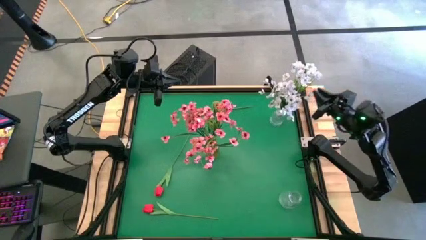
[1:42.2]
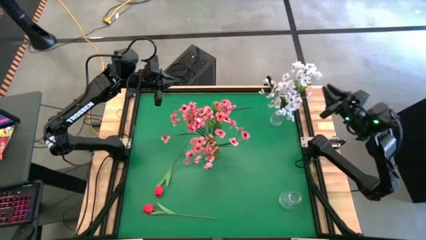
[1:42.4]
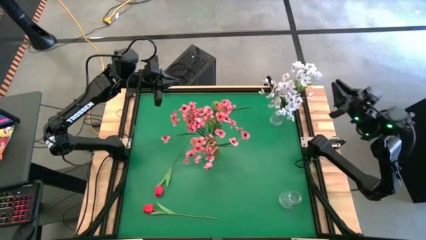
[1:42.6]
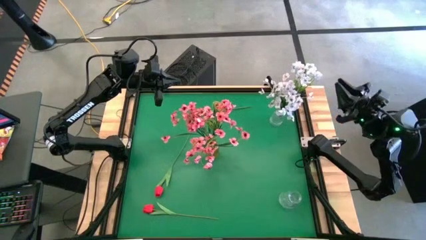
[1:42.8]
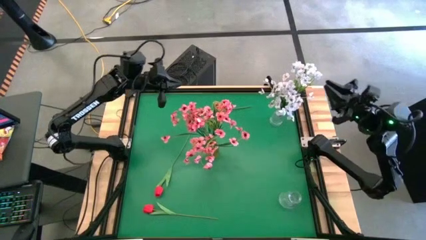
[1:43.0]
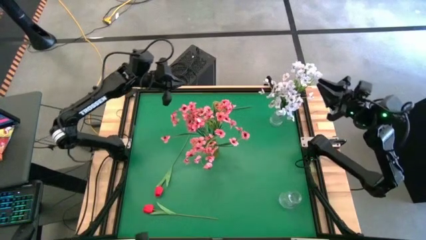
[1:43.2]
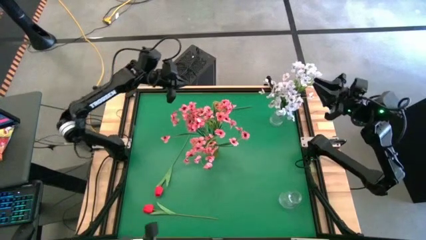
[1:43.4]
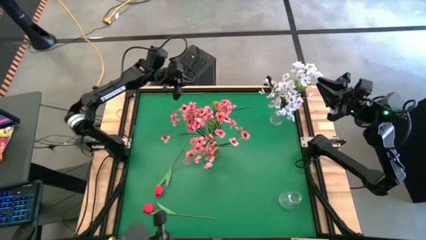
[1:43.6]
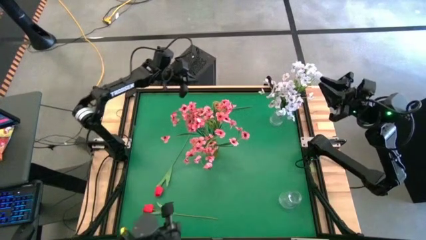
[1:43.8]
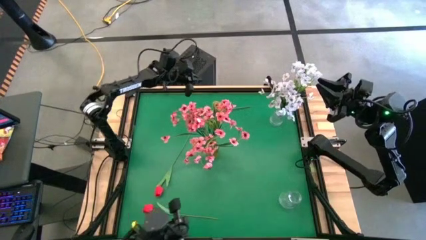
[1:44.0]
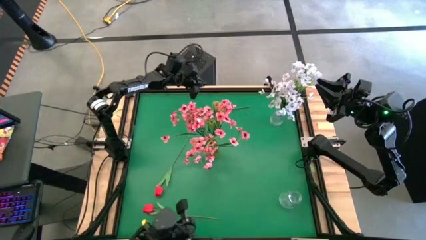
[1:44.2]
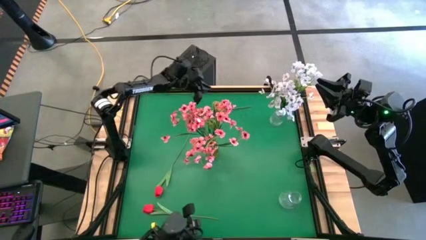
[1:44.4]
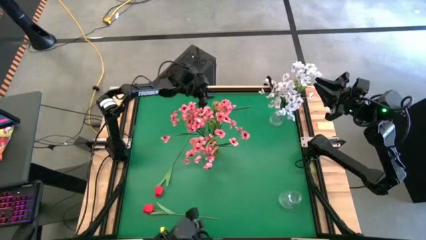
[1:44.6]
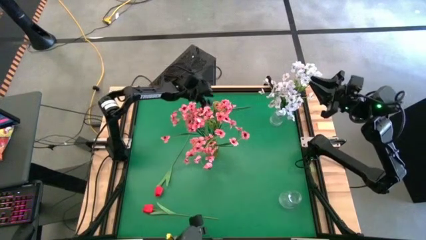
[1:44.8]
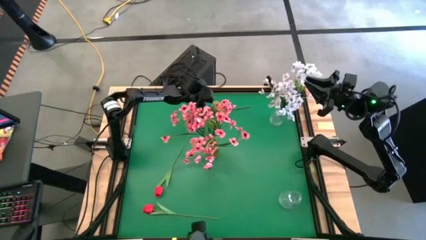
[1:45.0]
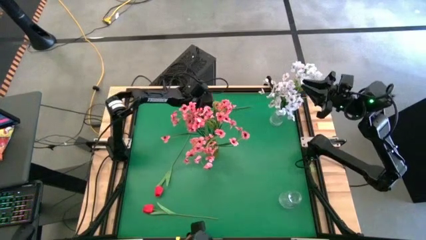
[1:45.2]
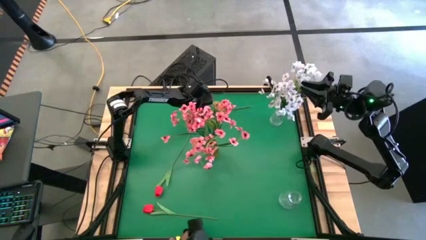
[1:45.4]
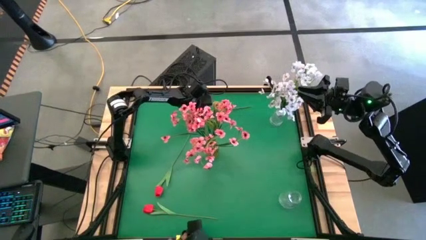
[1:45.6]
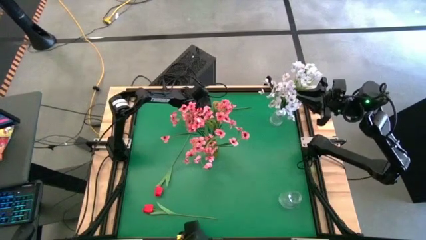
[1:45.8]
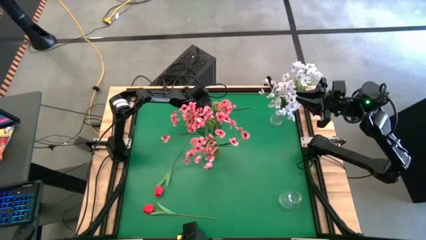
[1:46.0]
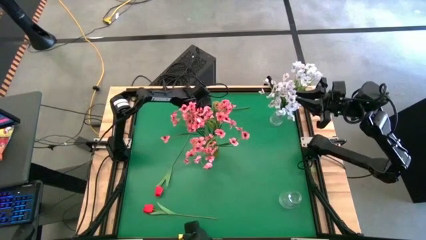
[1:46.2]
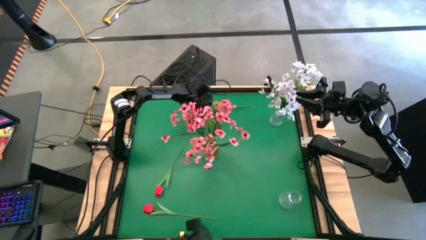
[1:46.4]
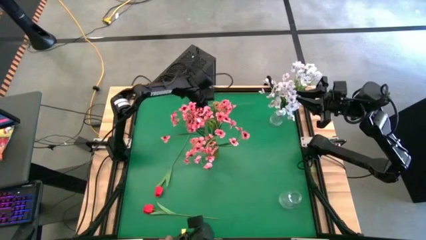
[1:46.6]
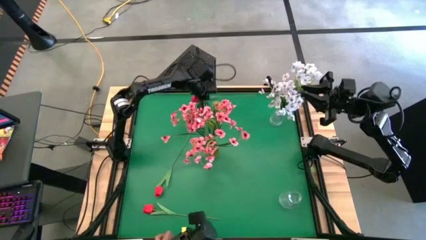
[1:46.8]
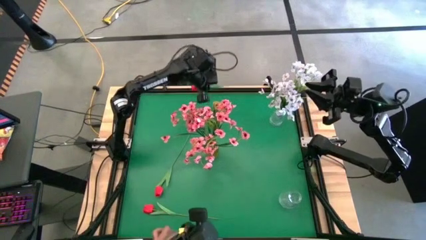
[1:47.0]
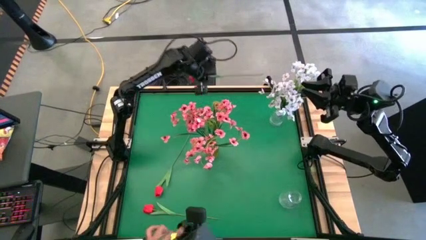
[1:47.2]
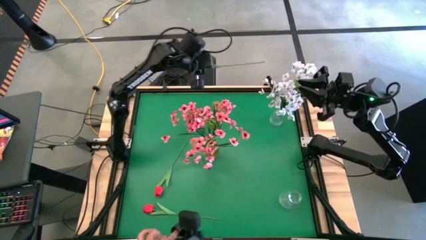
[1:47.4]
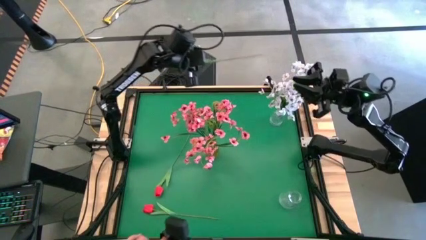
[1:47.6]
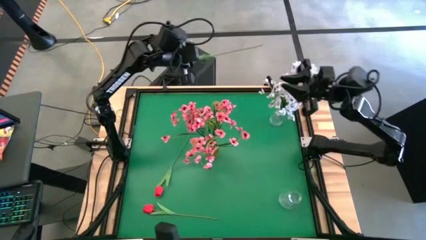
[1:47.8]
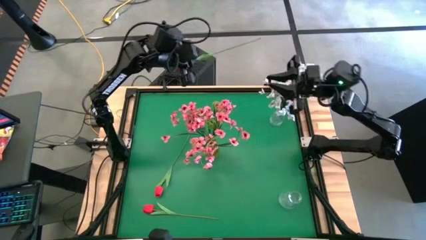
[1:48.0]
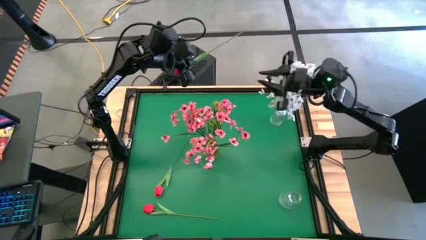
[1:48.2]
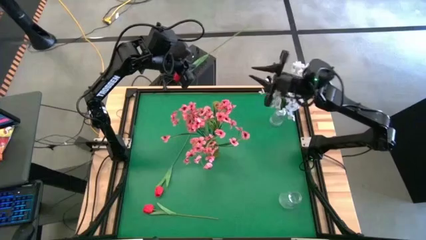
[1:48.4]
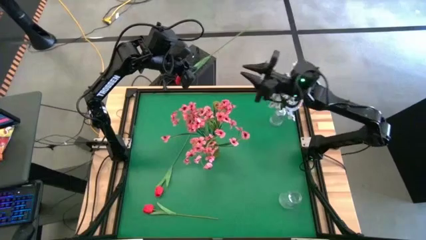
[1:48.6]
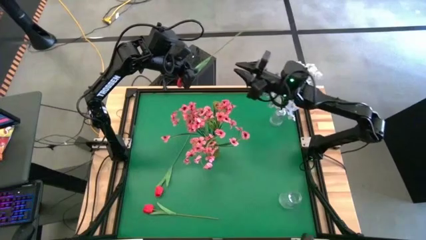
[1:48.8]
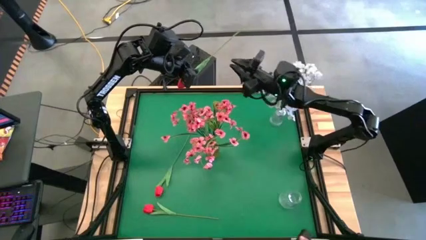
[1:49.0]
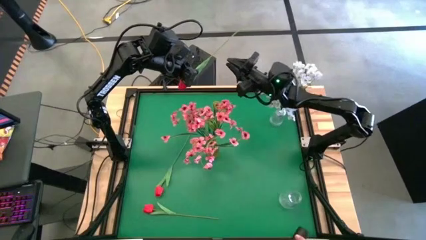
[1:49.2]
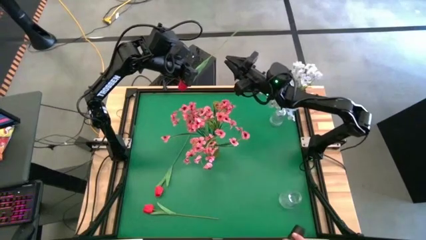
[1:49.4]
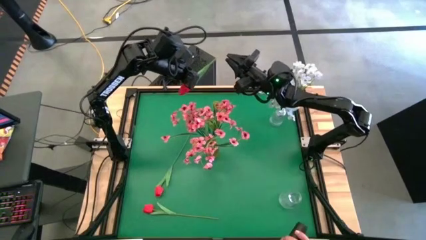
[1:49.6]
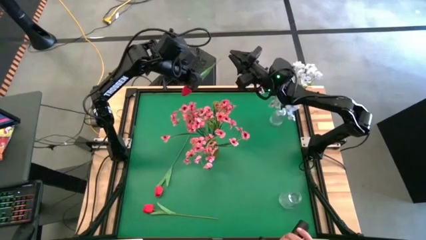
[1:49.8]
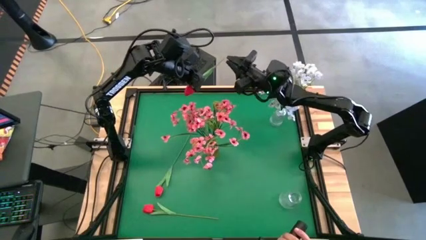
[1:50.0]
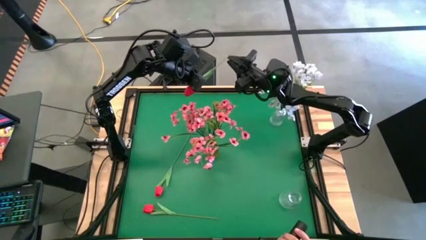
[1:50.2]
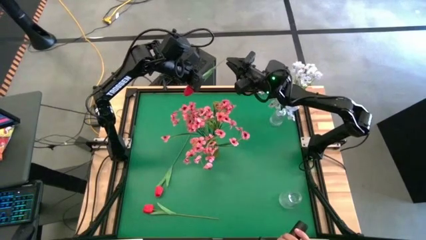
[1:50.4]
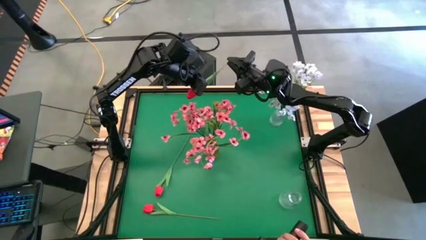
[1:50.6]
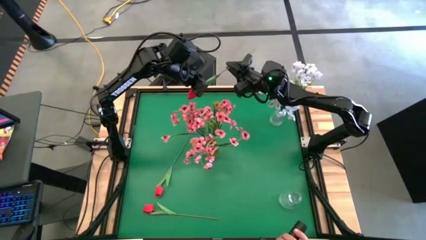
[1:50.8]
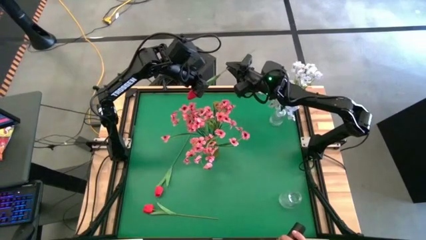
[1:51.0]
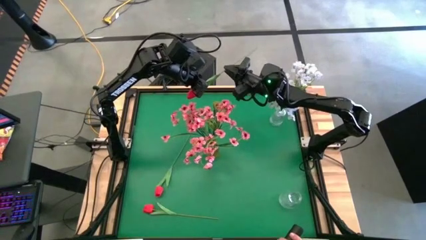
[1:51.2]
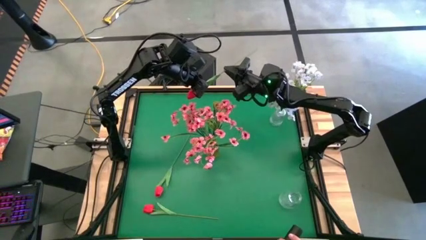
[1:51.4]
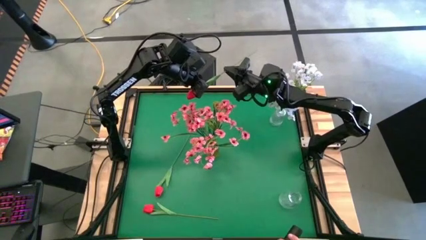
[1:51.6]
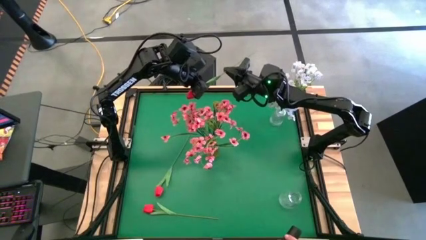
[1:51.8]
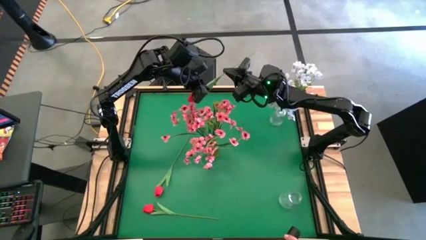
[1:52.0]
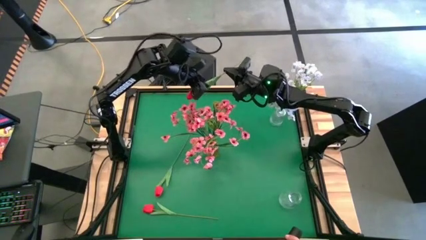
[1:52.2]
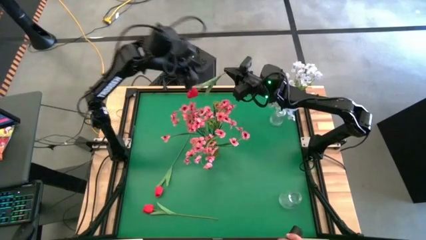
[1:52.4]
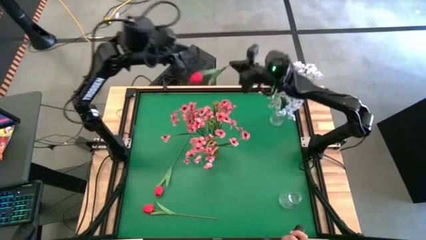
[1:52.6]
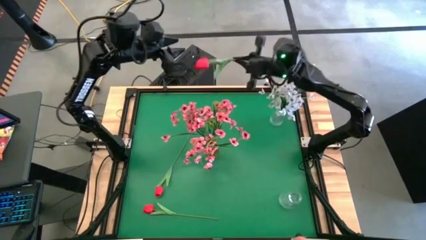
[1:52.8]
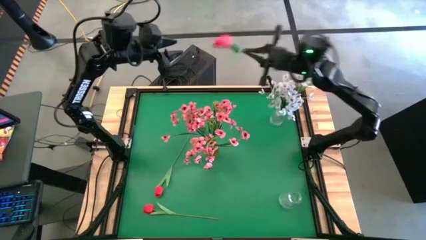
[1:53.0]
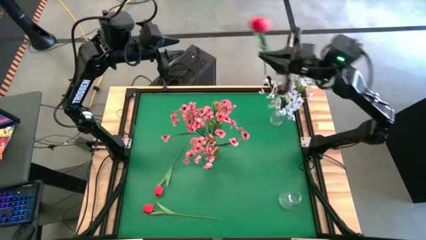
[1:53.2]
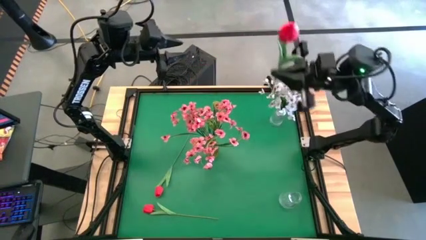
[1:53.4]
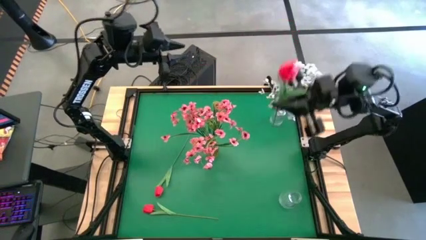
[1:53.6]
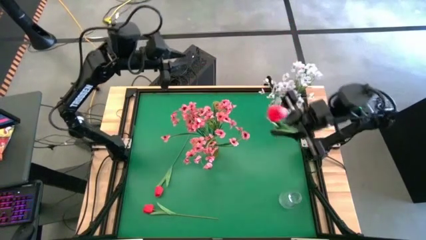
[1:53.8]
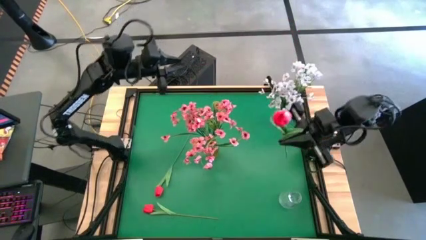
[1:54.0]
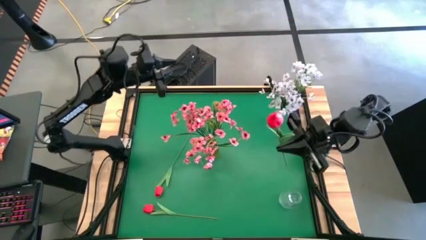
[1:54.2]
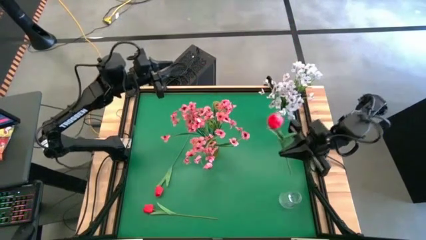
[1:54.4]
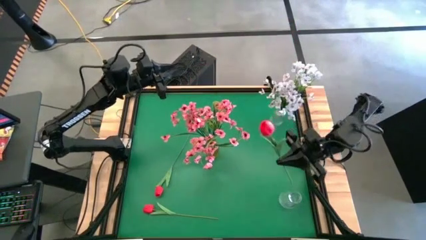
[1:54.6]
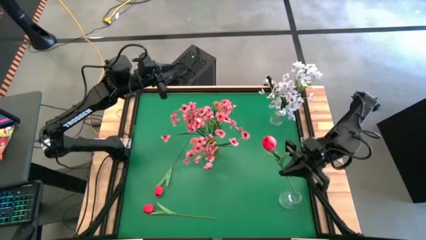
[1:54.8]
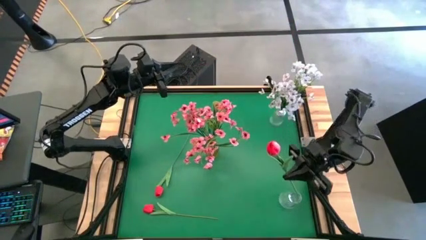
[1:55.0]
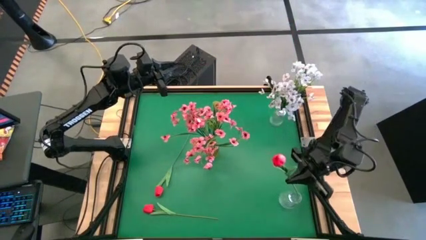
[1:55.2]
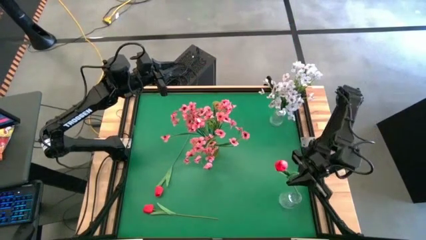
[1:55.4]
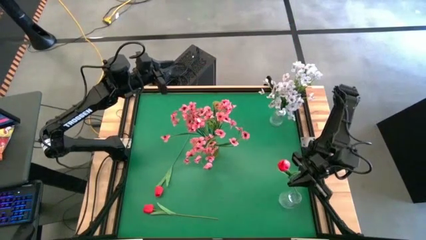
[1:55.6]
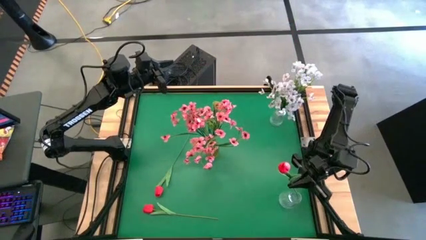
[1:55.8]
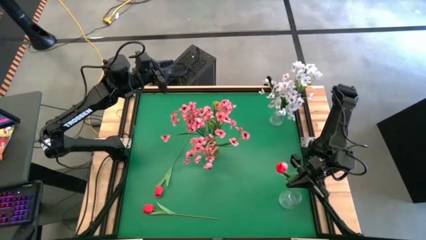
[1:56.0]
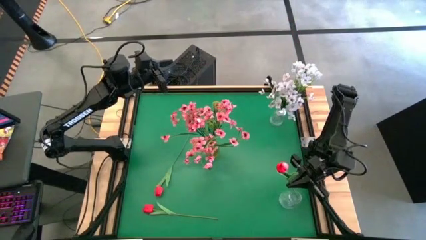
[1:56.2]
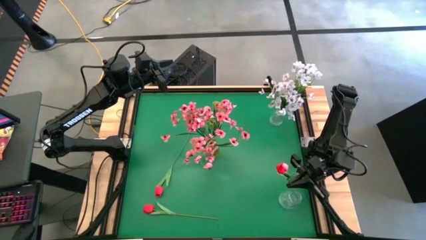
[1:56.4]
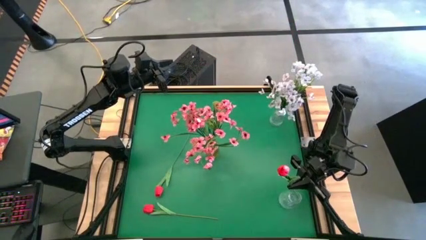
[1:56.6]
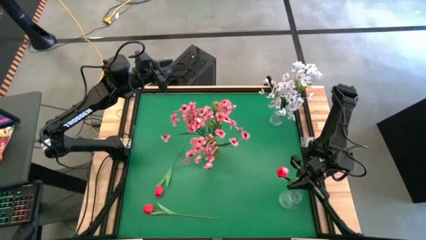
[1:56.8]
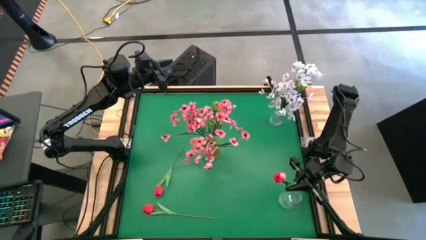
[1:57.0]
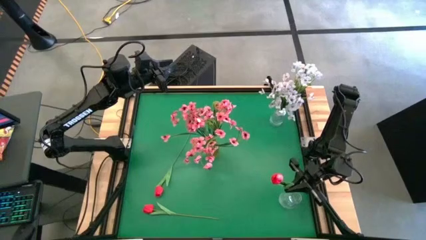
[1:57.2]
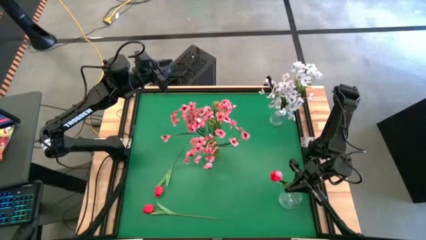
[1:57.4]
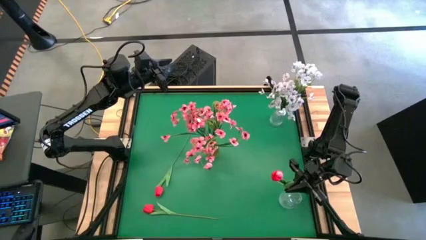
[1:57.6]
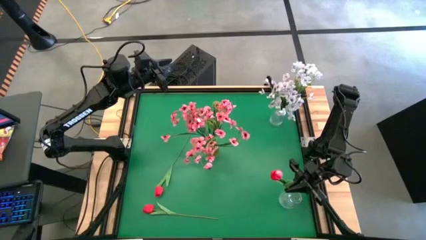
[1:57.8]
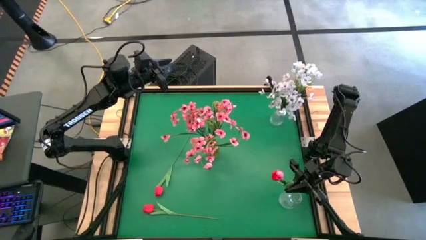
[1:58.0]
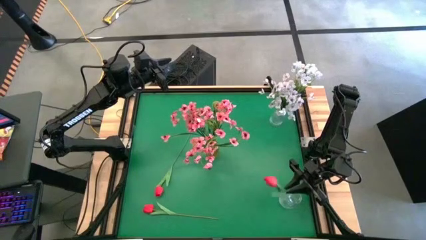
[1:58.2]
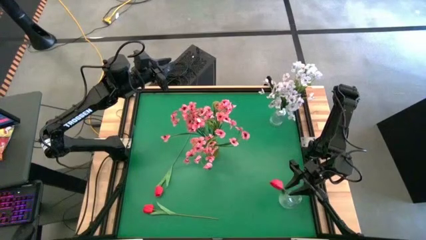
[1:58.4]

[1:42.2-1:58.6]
Task: Sort flowers into vase by color
Put the red flower into the bottom transparent vase
